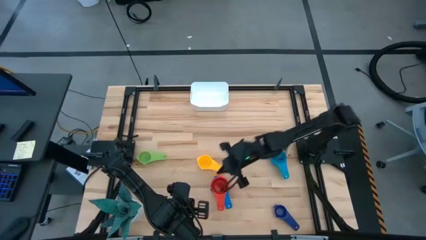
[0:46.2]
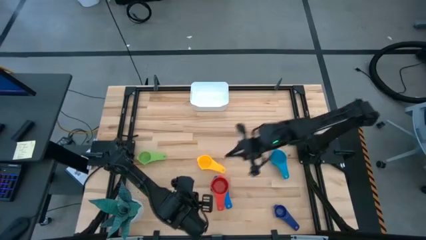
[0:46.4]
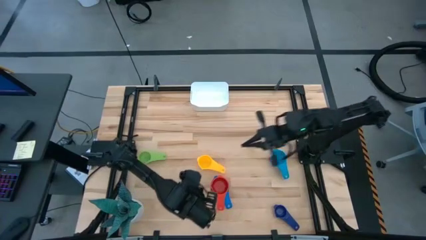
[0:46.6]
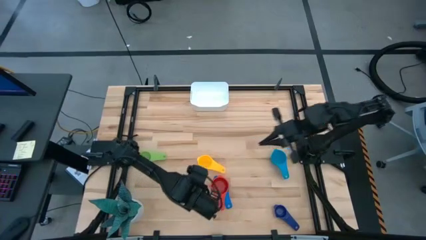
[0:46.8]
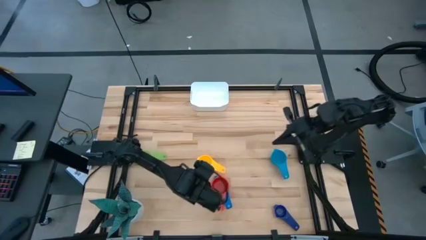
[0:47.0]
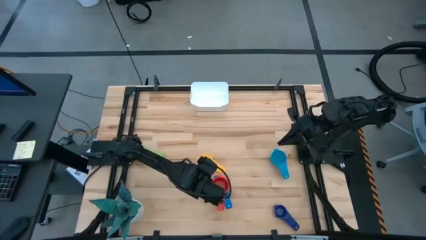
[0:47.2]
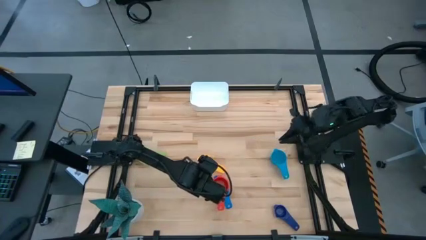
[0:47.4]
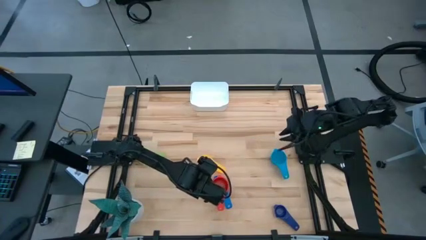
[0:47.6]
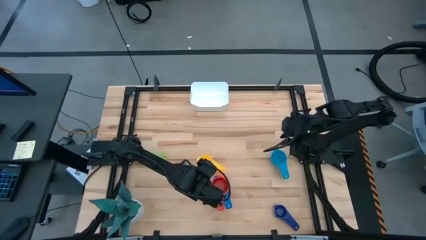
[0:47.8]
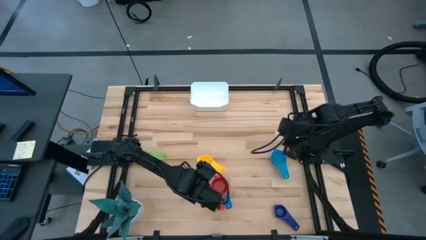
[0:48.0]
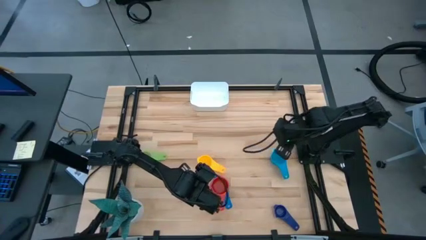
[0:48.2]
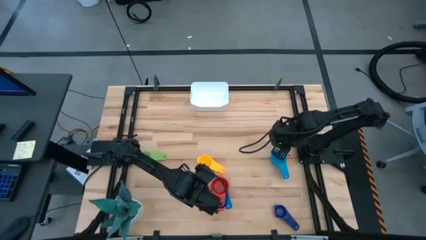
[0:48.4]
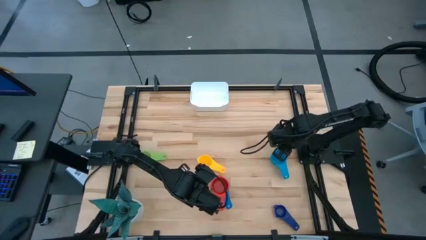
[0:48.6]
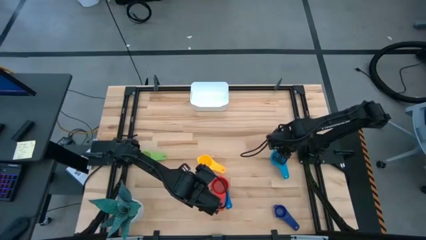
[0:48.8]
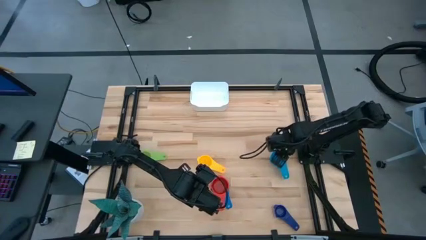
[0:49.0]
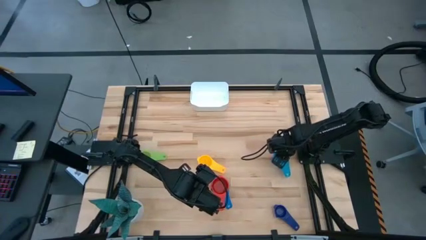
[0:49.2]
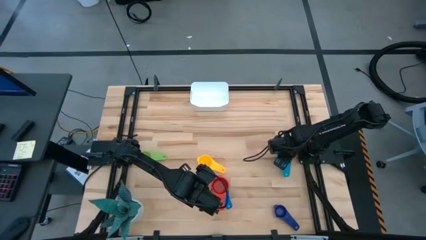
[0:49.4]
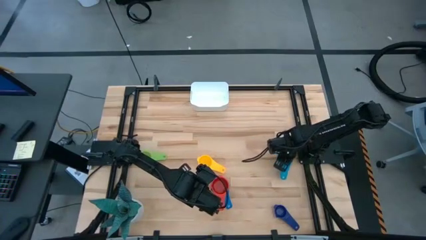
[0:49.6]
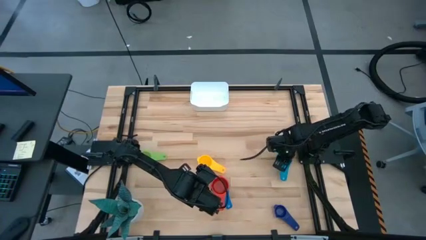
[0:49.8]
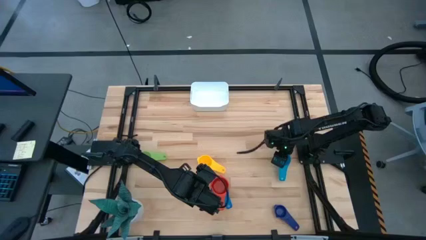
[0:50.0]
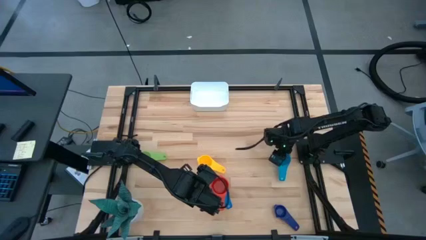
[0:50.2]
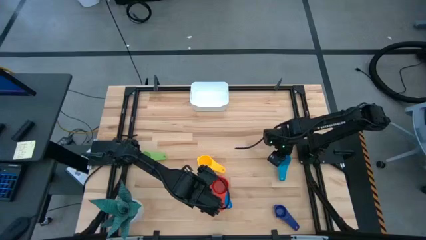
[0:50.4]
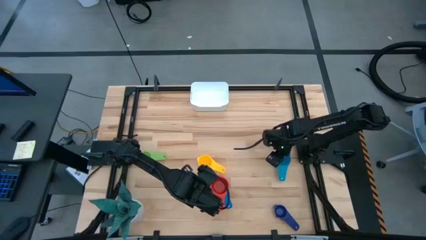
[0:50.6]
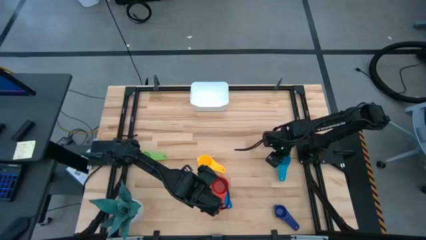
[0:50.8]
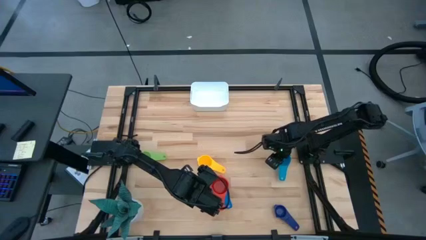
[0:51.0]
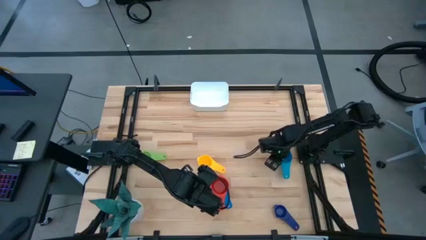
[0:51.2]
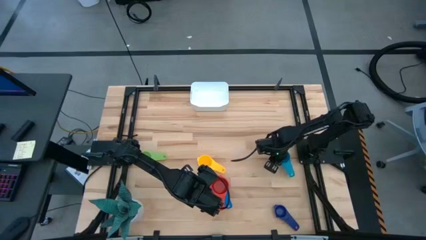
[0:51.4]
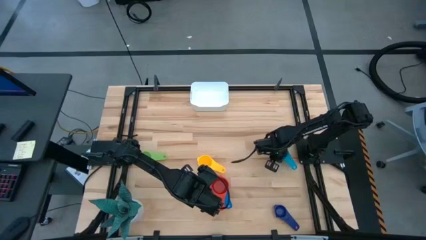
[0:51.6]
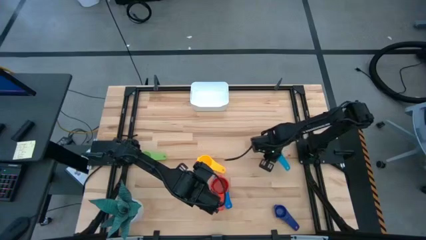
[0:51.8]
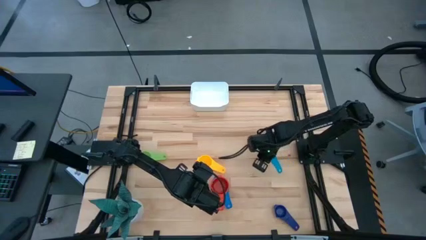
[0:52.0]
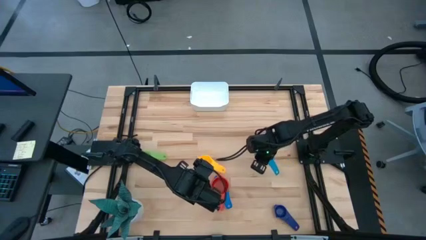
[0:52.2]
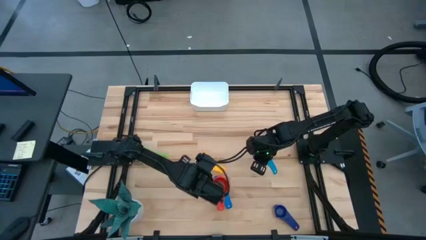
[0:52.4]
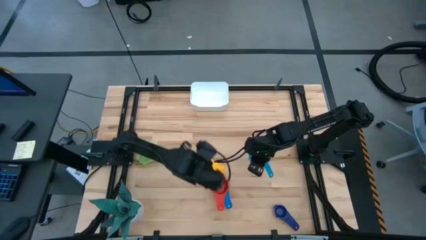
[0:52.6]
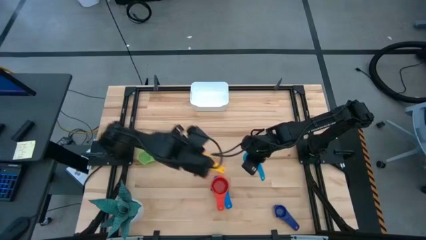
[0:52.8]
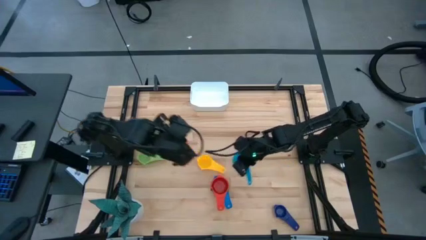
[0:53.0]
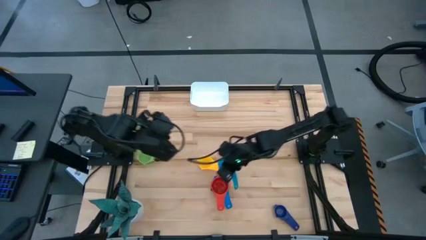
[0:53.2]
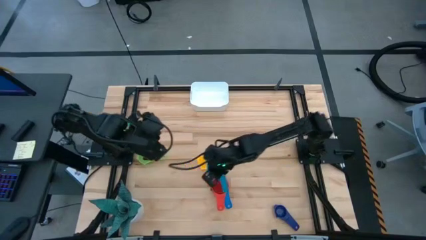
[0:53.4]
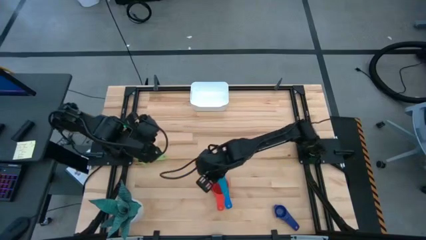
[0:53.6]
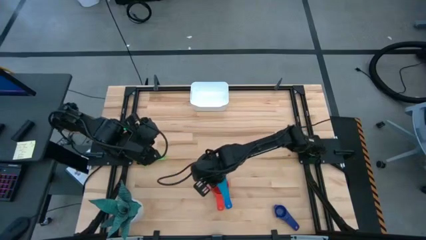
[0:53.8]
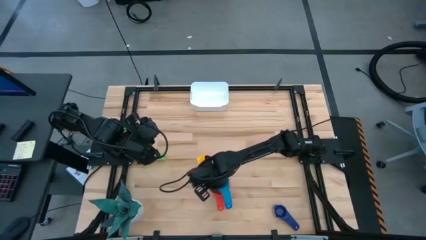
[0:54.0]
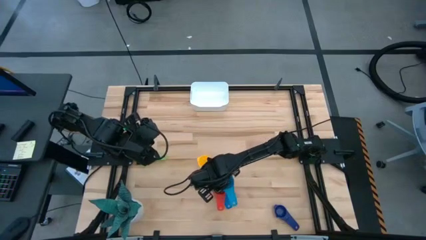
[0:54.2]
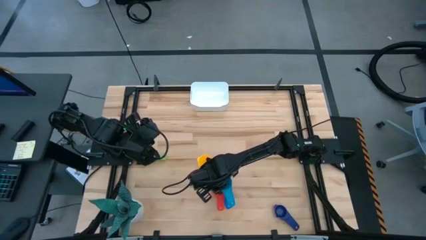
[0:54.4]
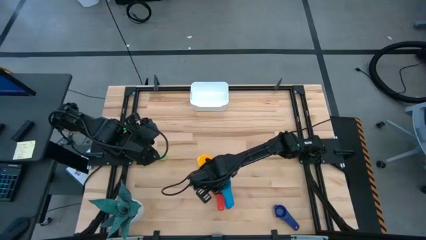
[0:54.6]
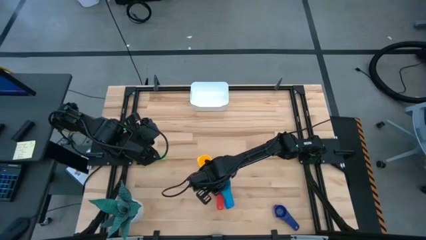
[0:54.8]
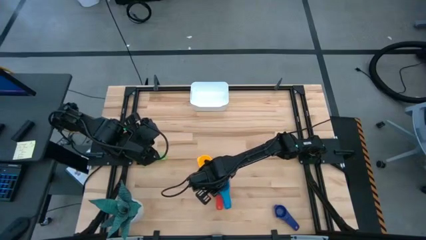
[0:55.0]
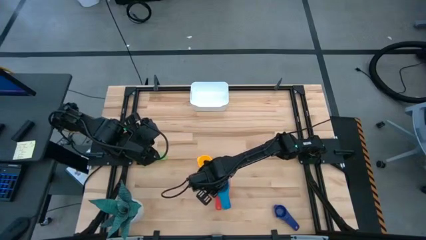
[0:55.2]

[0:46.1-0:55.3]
Task: Nest measuring cups in basket
Stack the light blue measuring cup on top of the red measuring cup

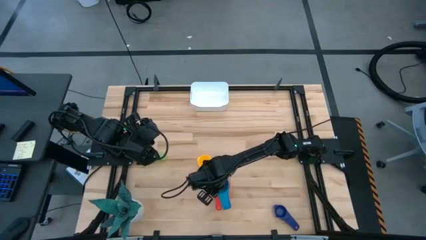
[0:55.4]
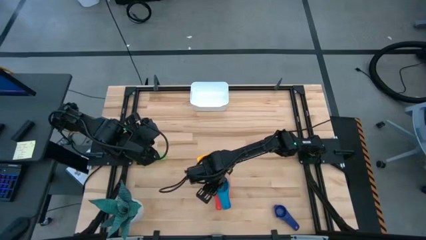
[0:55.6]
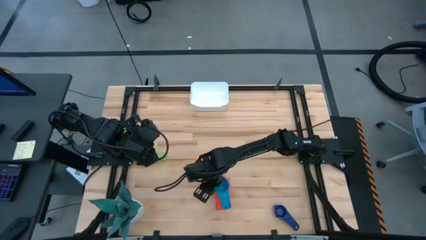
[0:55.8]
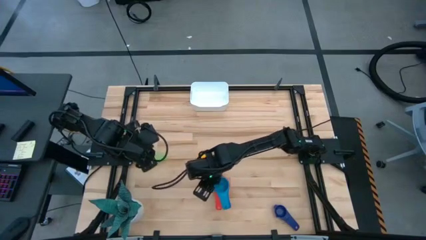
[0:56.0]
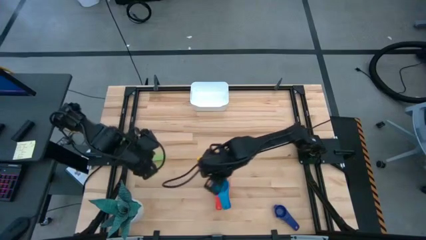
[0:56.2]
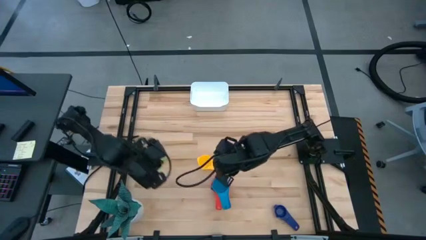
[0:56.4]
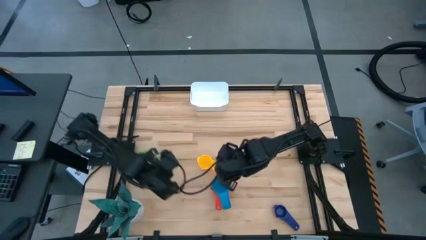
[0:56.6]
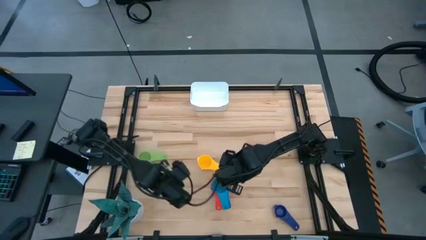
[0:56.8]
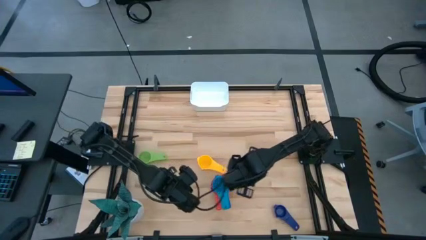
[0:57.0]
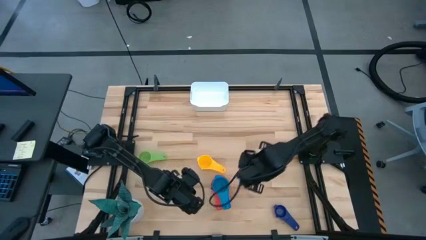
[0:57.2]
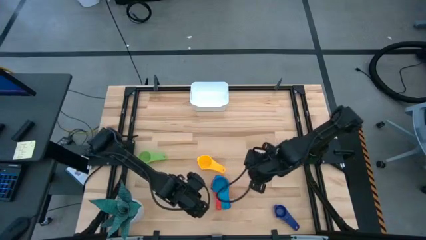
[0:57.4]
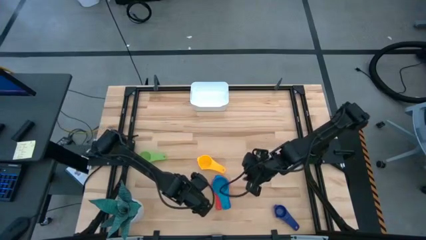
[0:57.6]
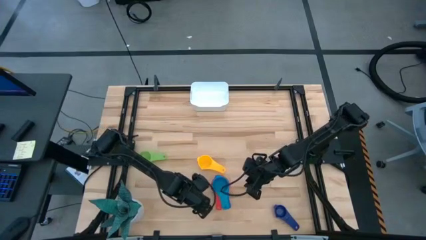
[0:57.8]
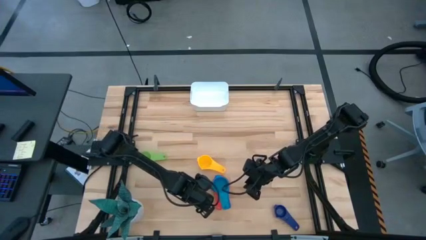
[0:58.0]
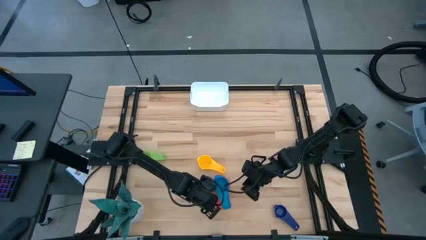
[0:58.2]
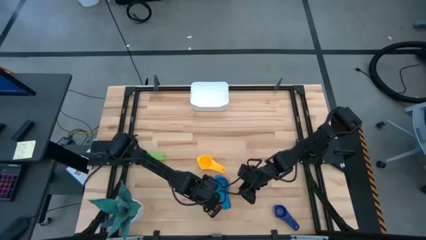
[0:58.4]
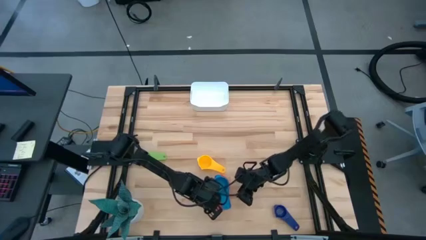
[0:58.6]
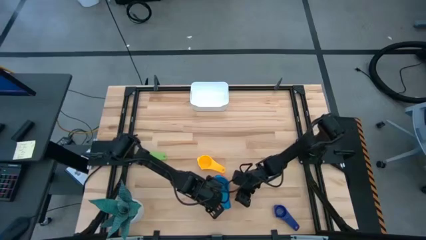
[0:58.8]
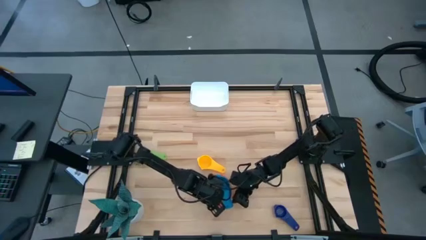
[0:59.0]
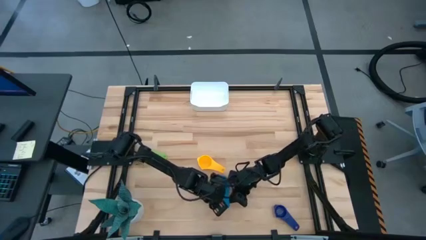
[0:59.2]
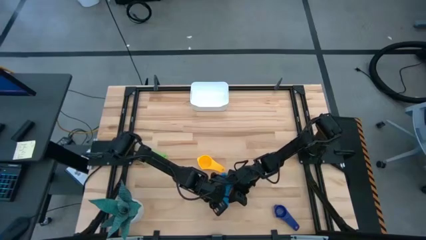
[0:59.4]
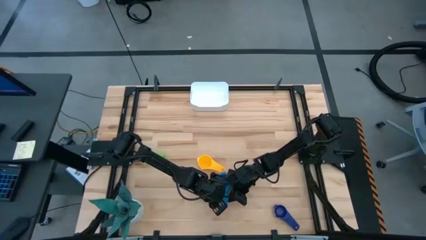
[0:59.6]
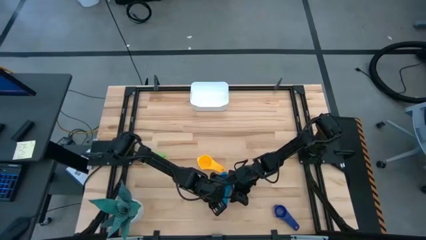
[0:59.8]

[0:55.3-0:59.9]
Adjust the stacked measuring cups
